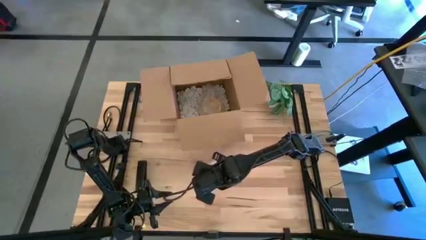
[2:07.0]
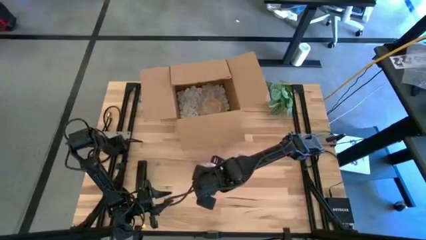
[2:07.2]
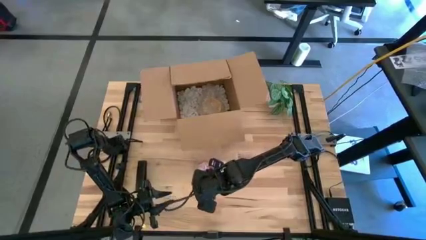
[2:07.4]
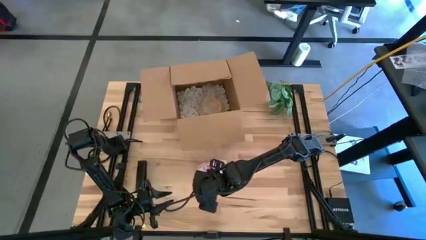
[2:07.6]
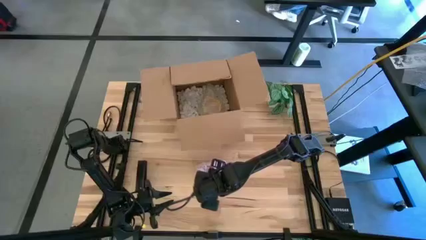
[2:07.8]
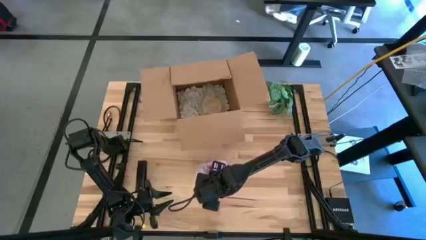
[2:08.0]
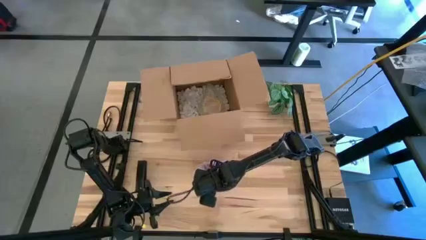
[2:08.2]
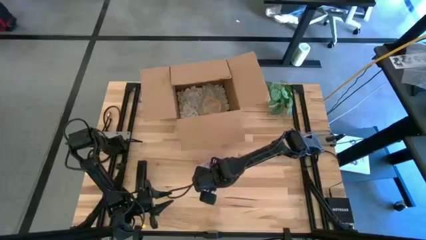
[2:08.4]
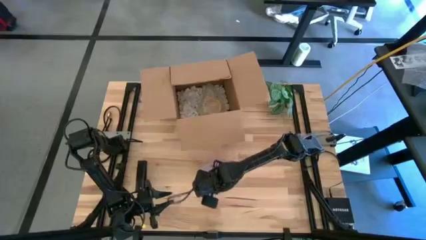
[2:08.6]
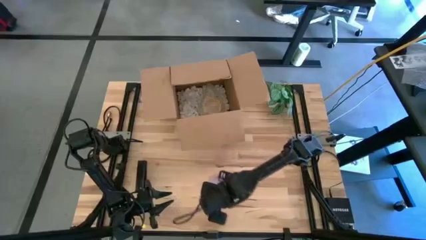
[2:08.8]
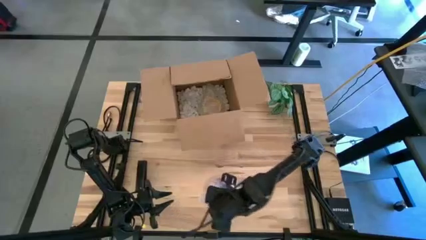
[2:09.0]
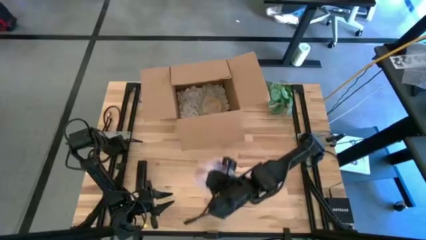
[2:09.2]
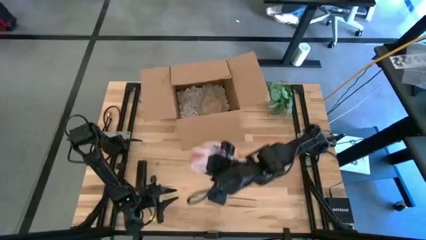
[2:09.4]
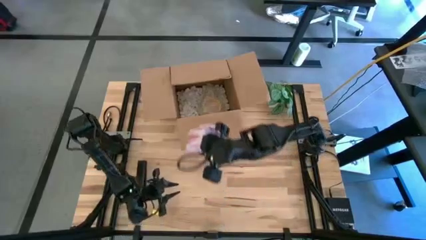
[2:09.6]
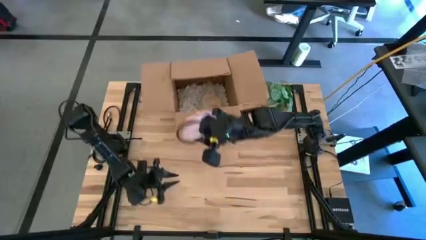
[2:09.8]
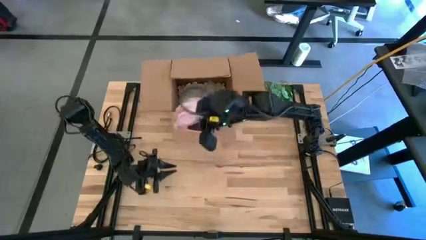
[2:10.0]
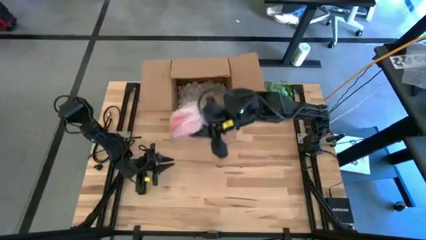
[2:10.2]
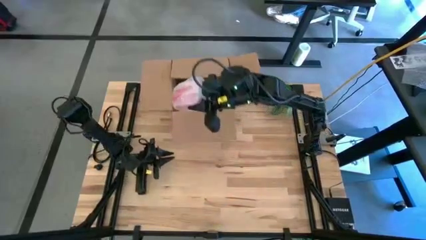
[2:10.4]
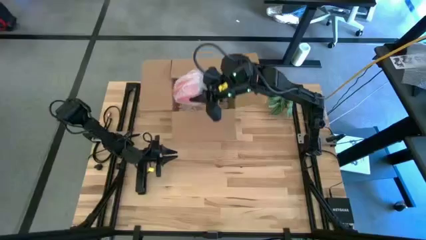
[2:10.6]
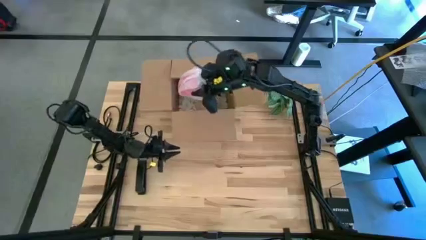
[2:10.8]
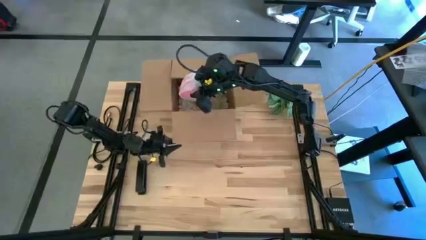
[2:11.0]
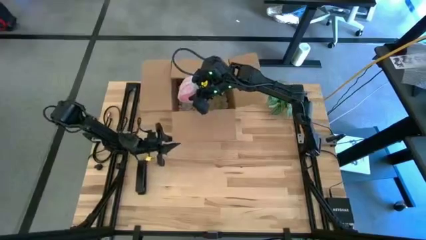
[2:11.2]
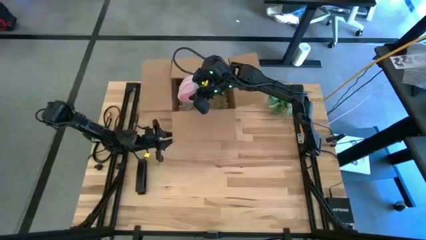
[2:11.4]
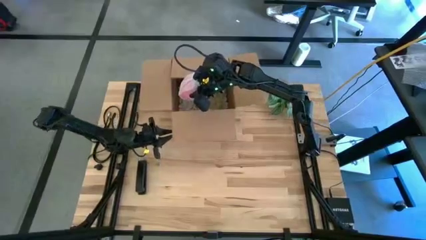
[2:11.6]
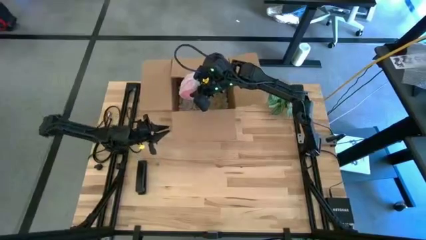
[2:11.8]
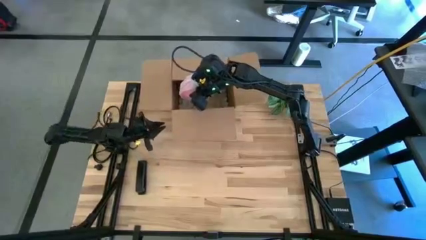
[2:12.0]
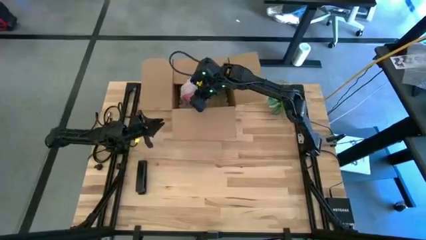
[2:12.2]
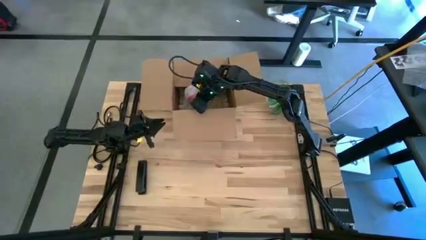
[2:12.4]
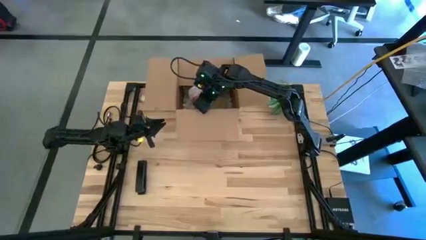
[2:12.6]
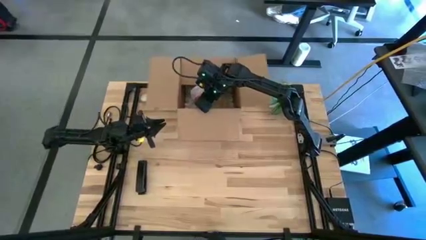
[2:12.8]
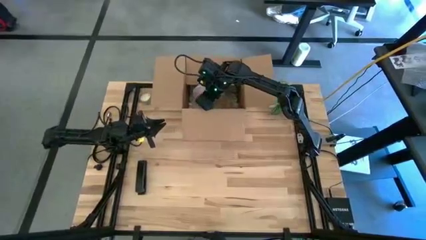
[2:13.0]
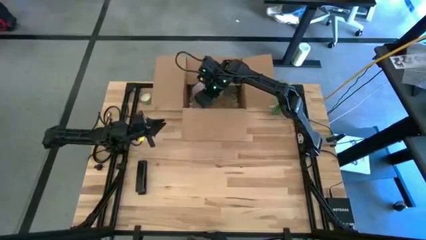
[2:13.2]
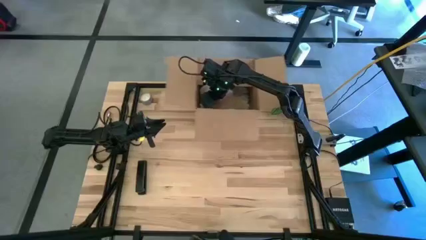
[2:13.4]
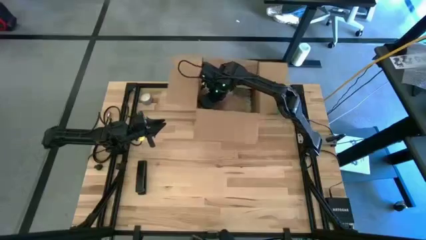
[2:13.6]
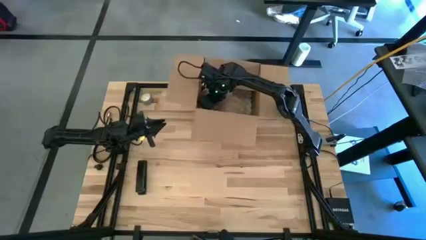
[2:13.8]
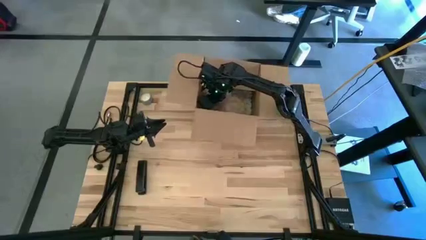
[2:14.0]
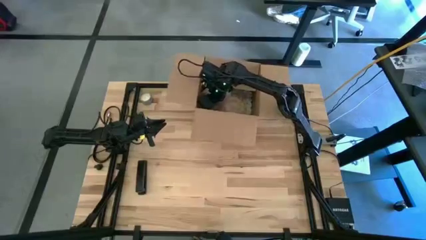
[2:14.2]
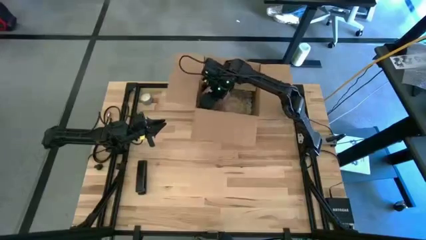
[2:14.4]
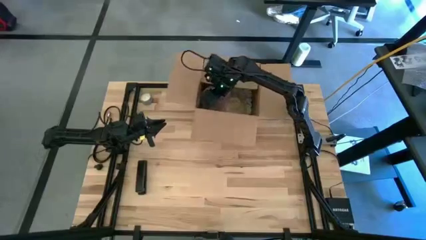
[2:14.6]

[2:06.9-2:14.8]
Task: wrap mug
Put the wrapped red mug into the cardboard box

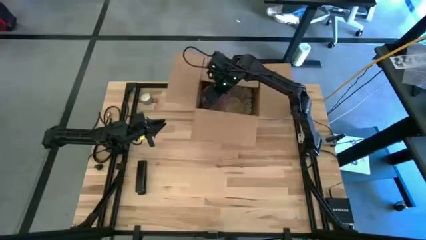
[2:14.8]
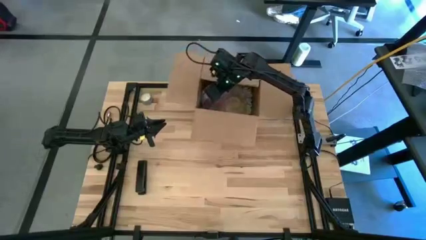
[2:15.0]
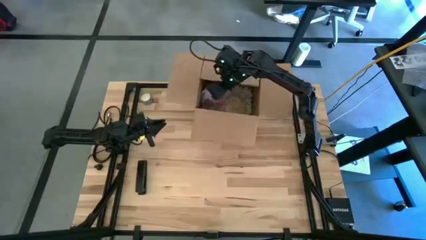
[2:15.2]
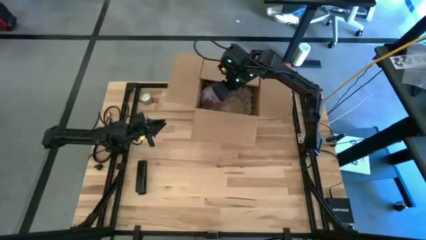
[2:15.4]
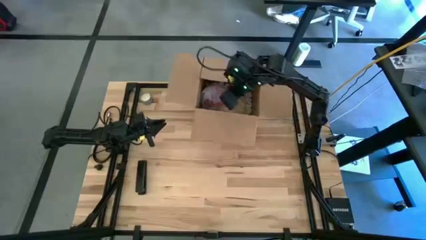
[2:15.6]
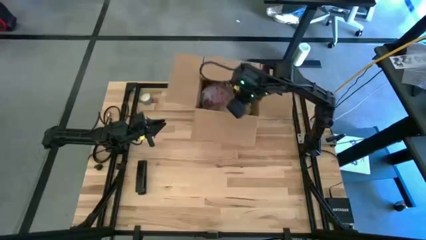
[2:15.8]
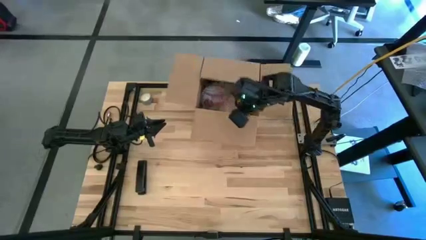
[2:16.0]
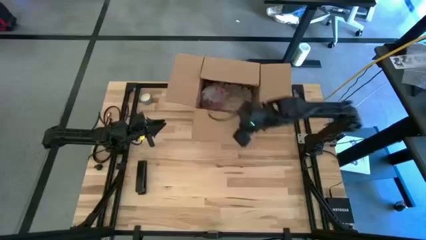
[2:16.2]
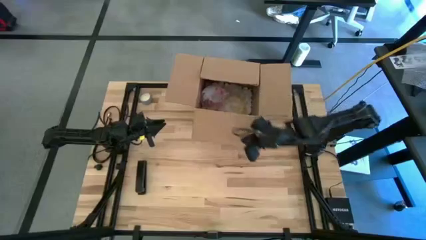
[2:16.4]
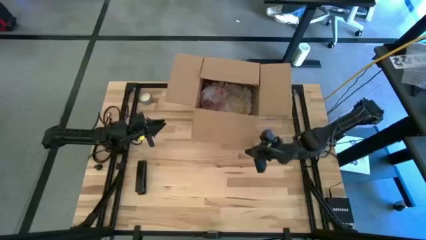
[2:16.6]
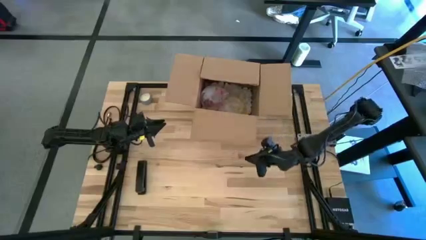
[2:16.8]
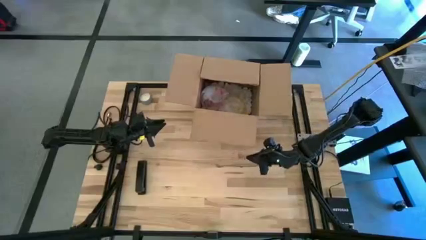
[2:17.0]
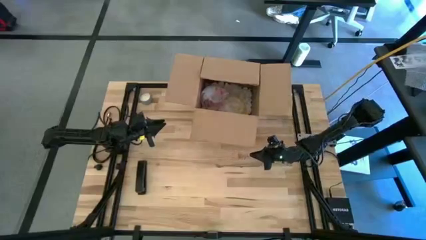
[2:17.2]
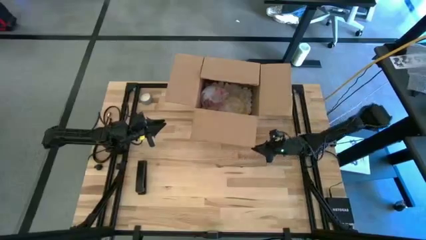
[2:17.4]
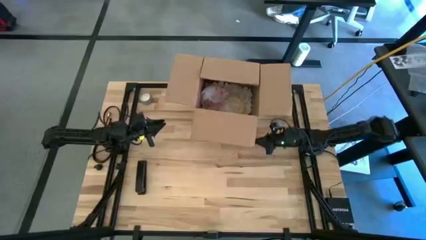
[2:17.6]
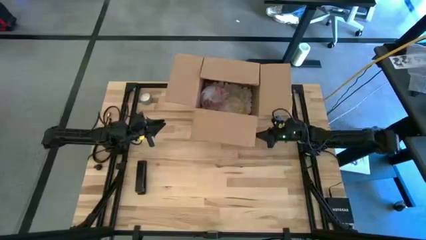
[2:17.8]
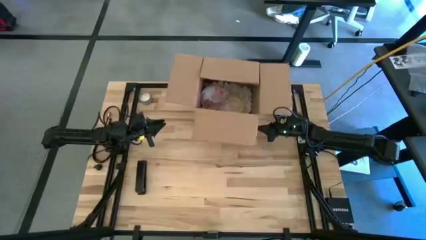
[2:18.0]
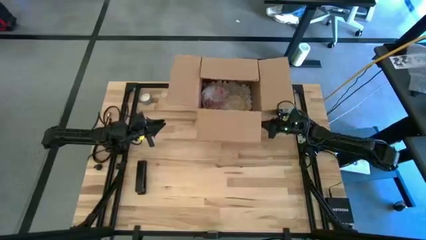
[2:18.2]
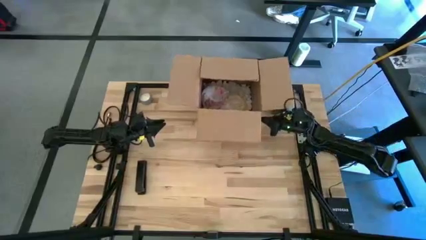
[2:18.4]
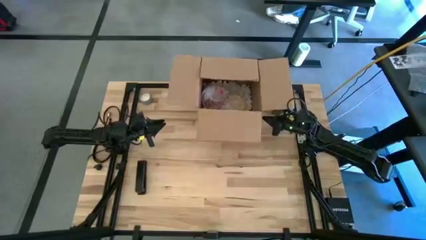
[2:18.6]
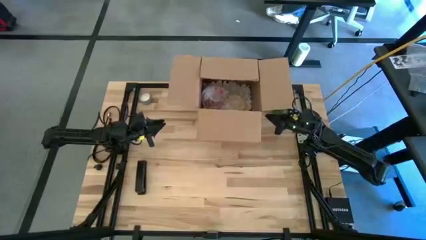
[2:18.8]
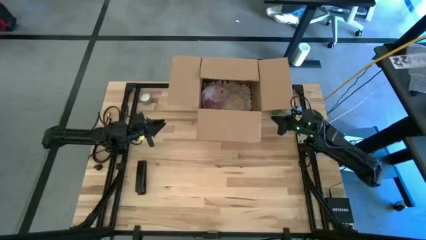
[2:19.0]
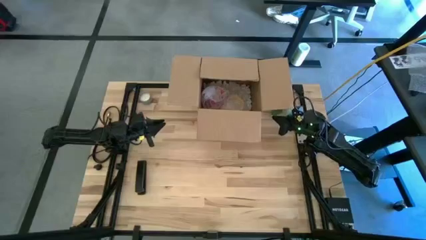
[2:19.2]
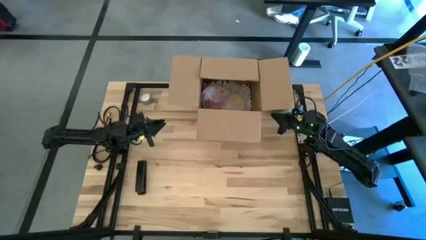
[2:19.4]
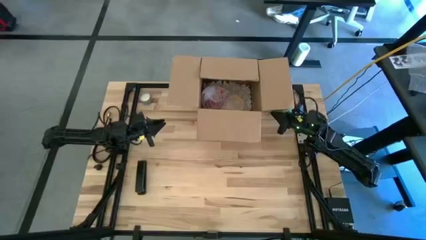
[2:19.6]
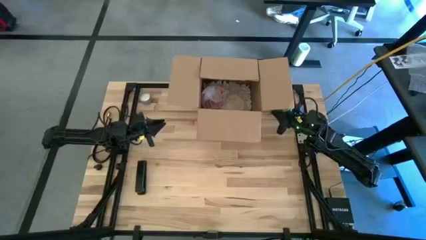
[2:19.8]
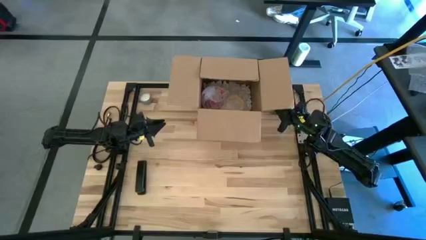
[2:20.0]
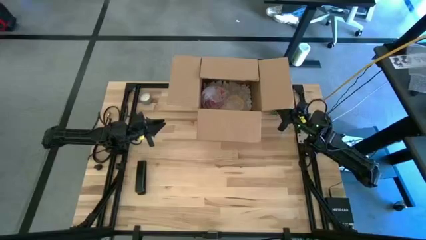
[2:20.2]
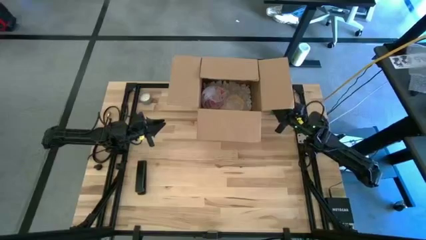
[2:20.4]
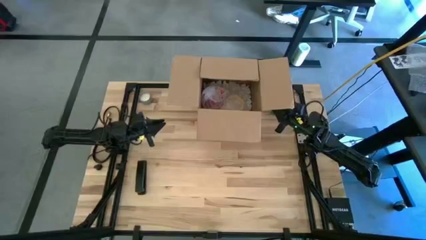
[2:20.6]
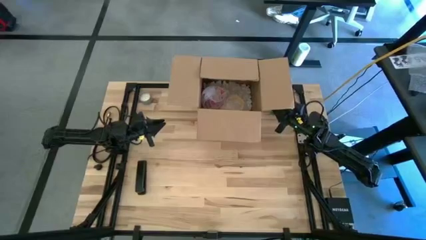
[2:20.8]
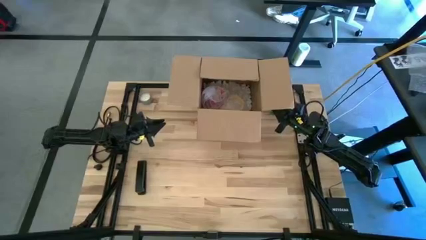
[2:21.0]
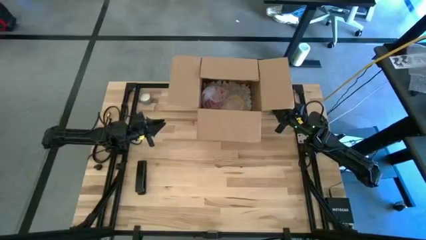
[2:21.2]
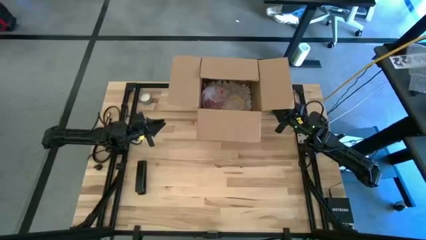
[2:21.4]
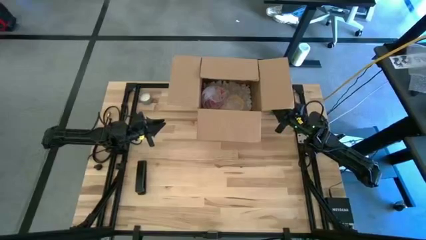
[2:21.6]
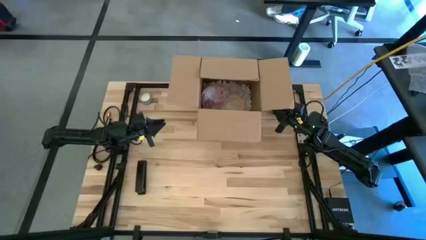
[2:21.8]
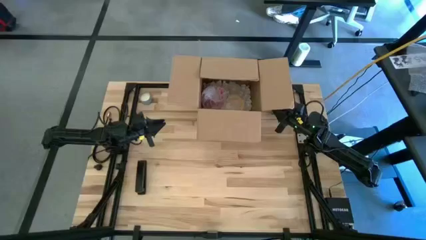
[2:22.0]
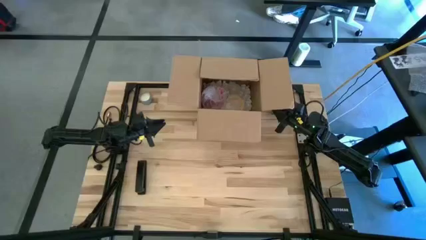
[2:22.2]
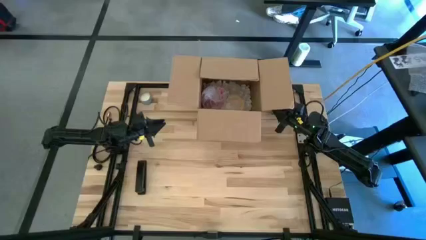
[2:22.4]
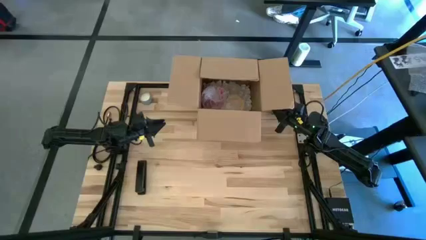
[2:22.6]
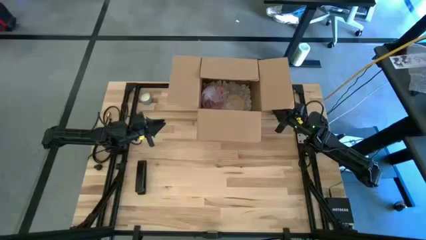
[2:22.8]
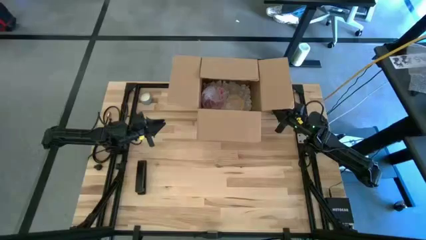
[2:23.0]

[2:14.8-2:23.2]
Return to Home Position
